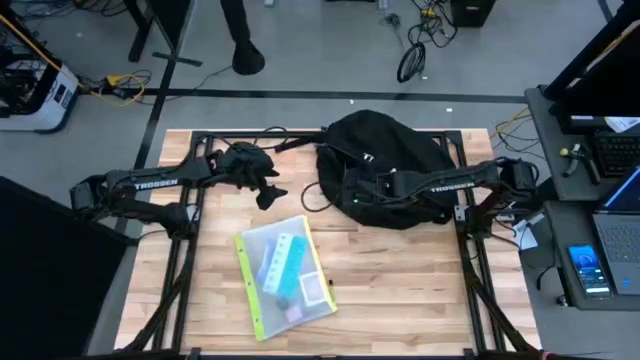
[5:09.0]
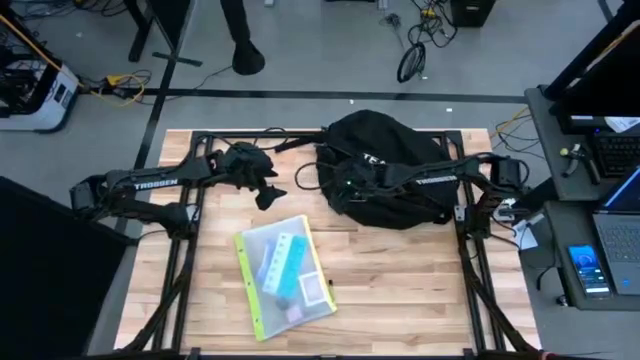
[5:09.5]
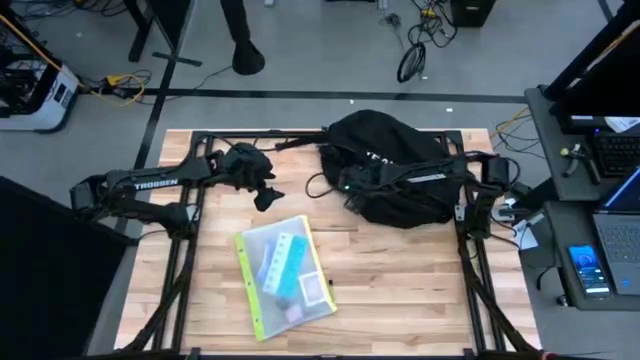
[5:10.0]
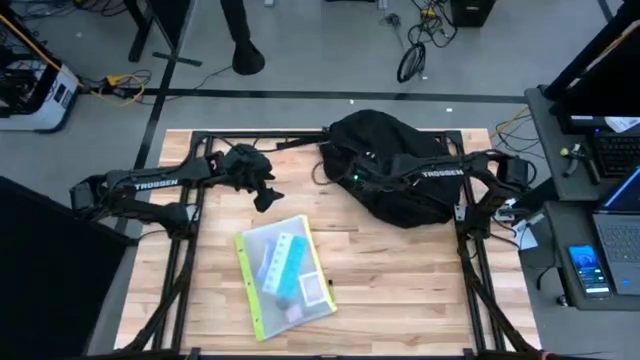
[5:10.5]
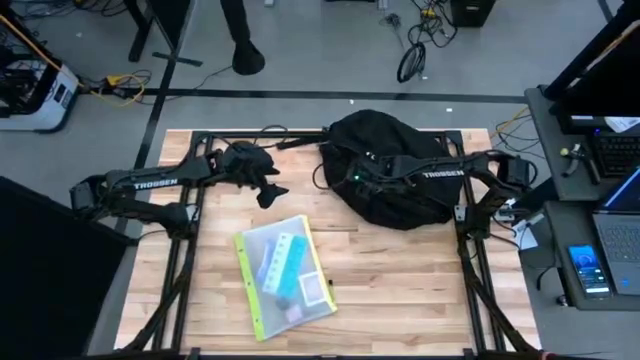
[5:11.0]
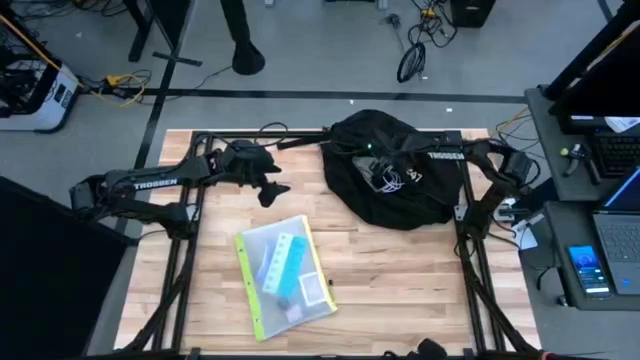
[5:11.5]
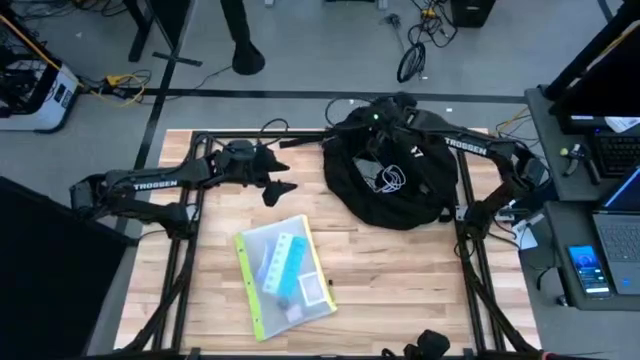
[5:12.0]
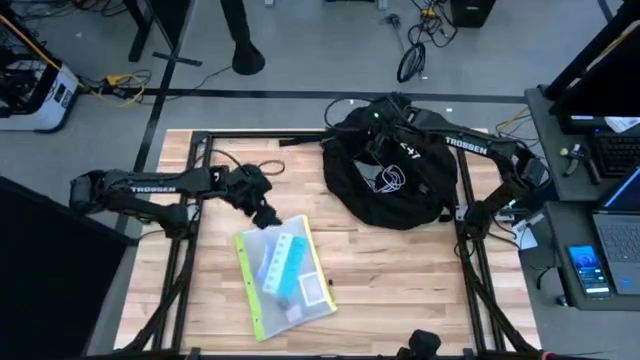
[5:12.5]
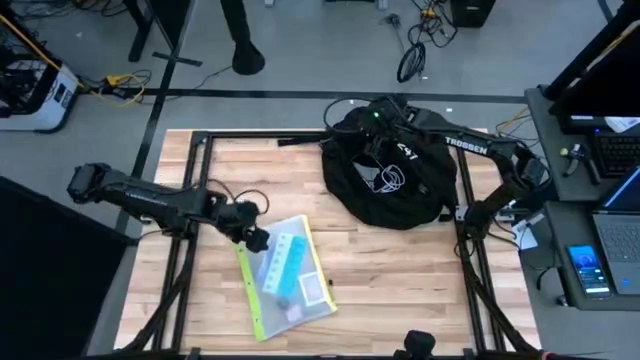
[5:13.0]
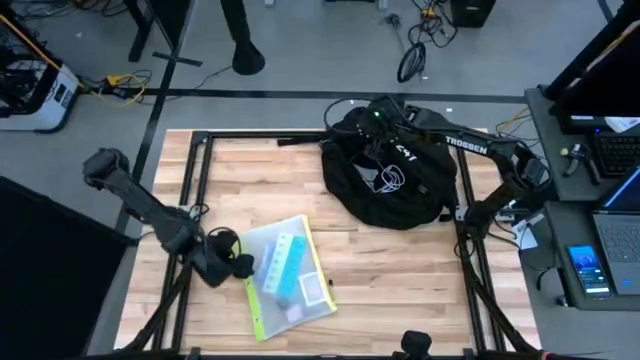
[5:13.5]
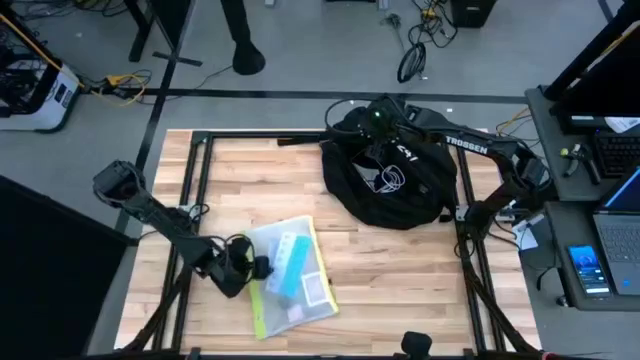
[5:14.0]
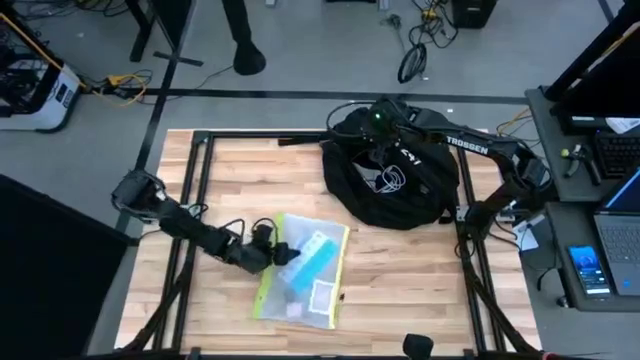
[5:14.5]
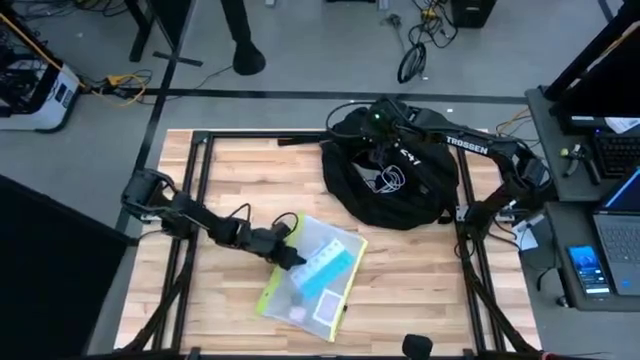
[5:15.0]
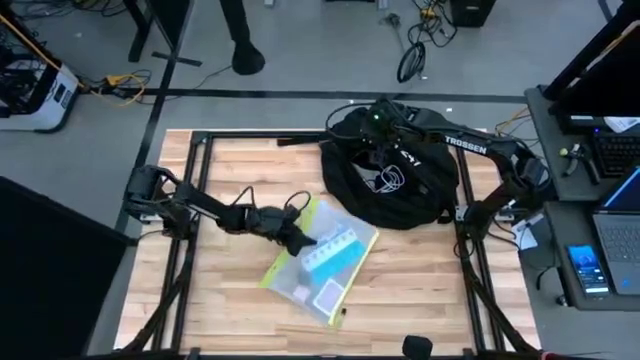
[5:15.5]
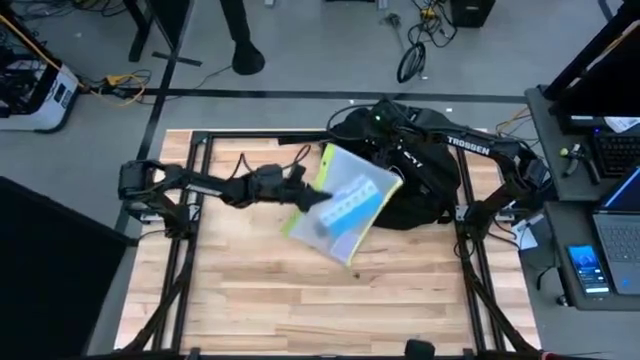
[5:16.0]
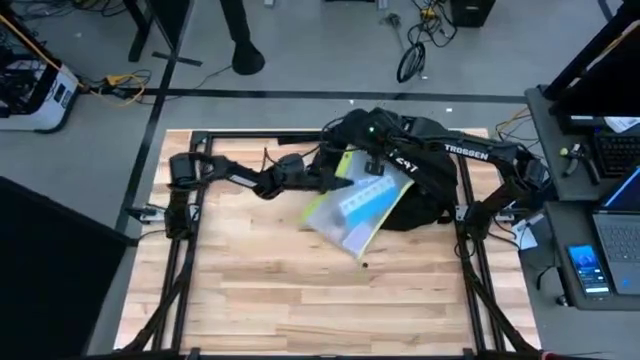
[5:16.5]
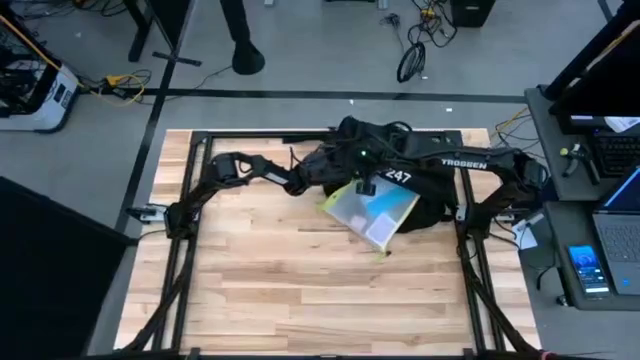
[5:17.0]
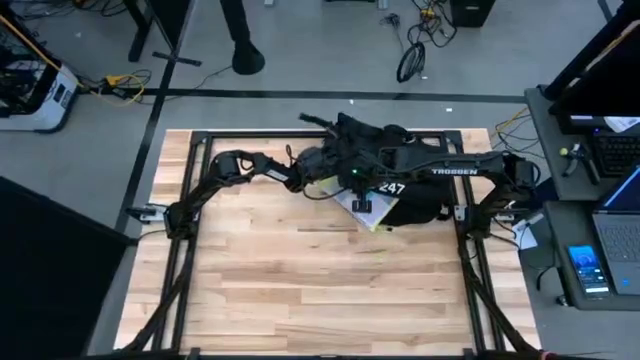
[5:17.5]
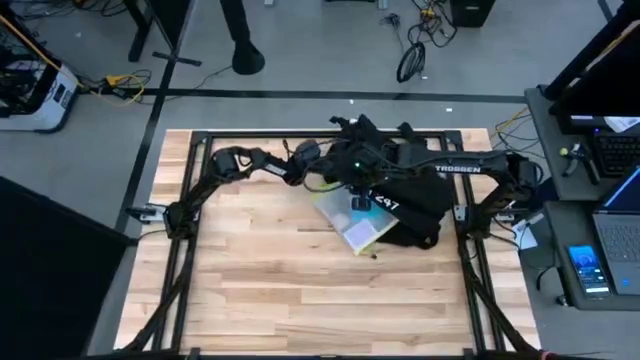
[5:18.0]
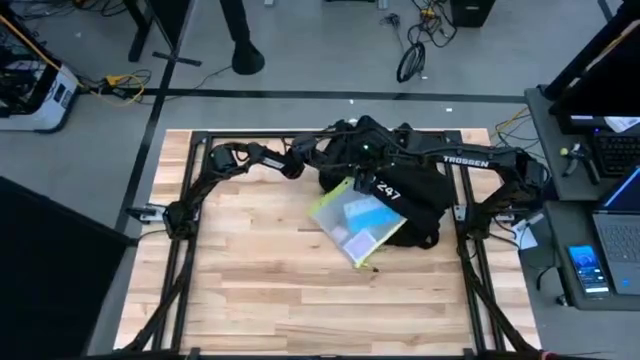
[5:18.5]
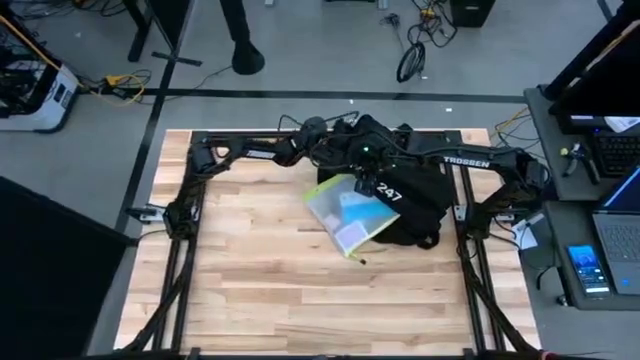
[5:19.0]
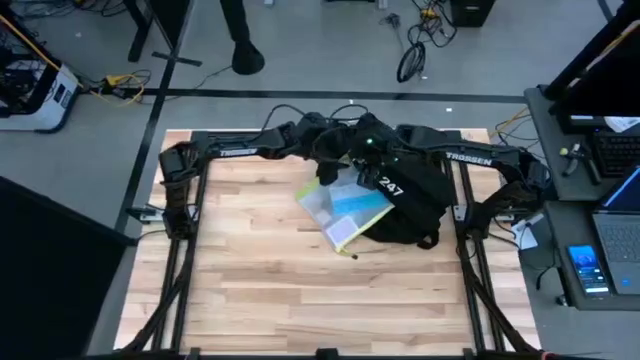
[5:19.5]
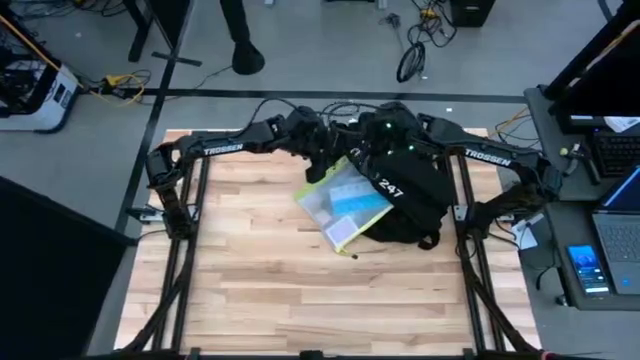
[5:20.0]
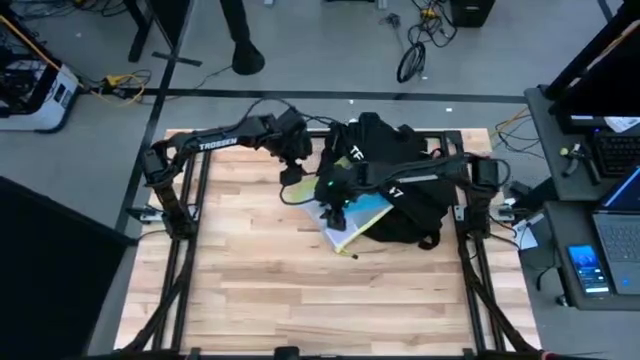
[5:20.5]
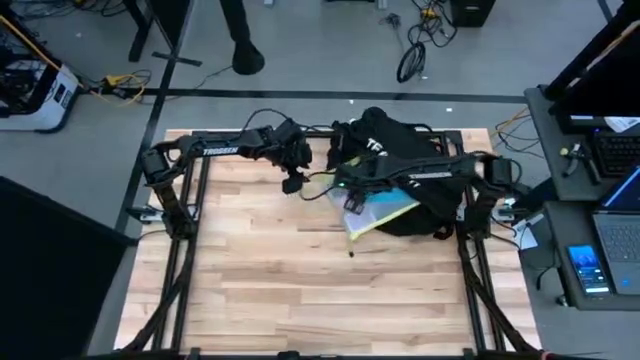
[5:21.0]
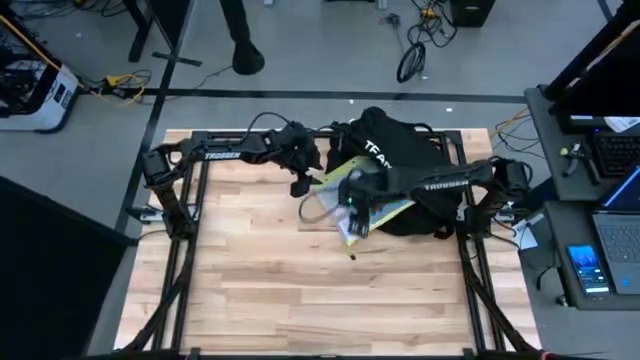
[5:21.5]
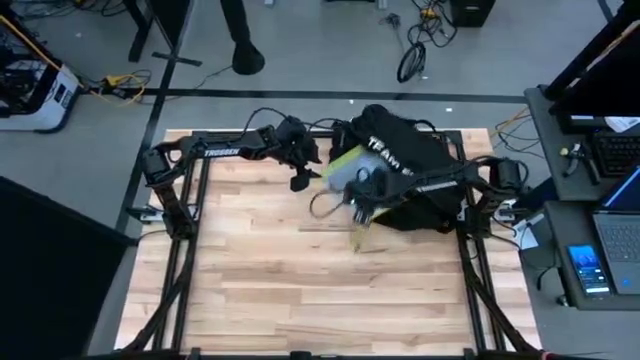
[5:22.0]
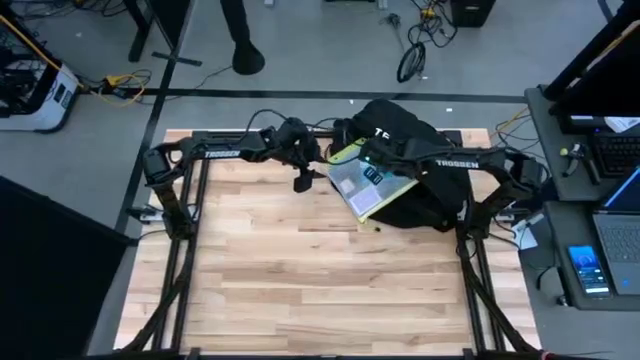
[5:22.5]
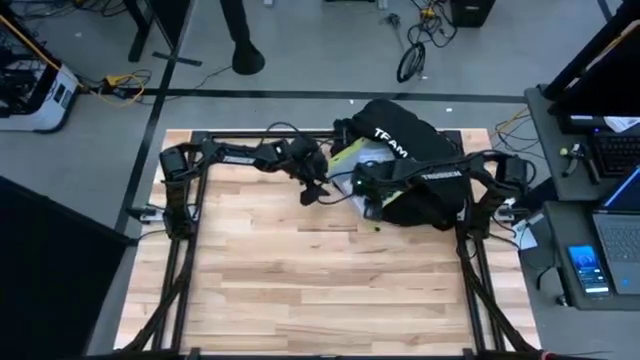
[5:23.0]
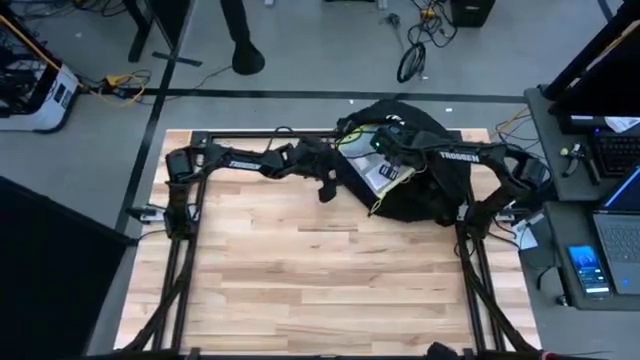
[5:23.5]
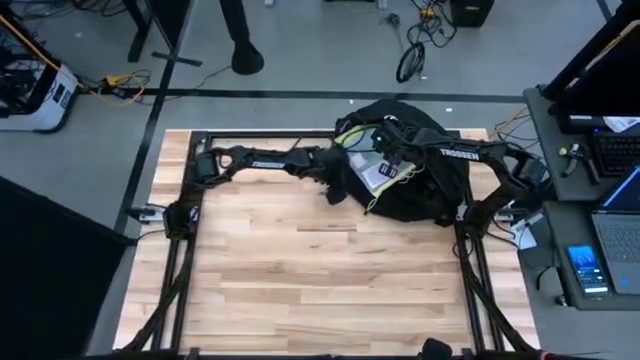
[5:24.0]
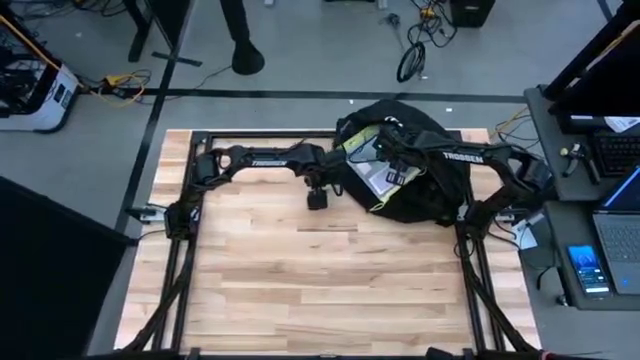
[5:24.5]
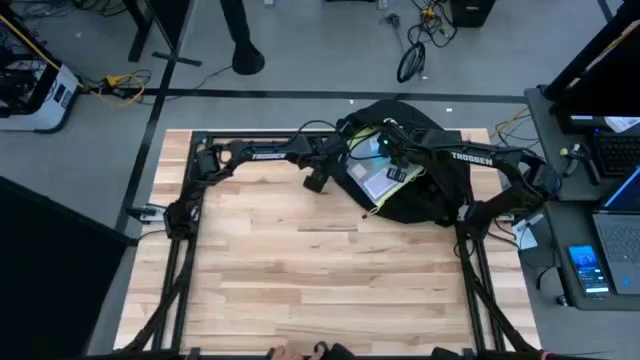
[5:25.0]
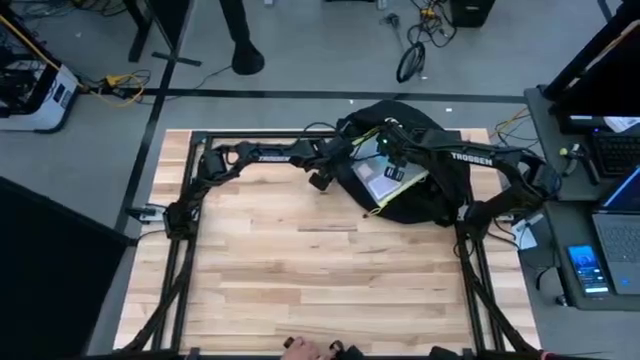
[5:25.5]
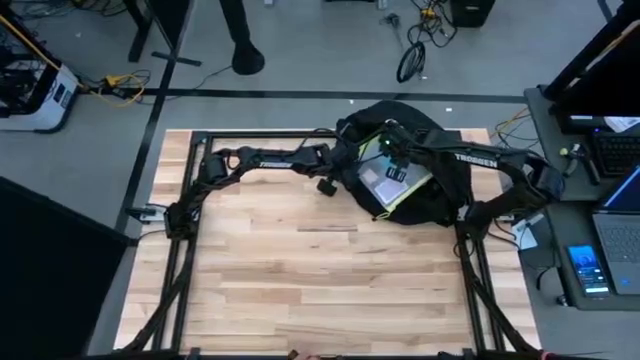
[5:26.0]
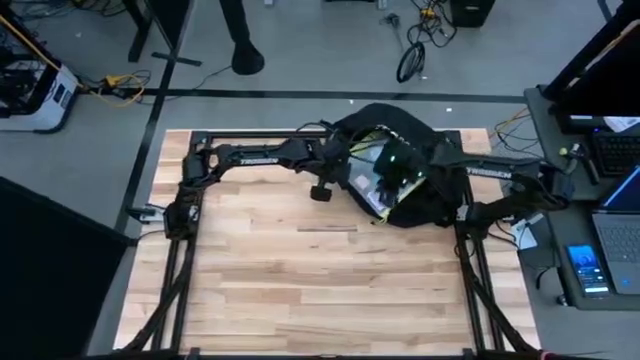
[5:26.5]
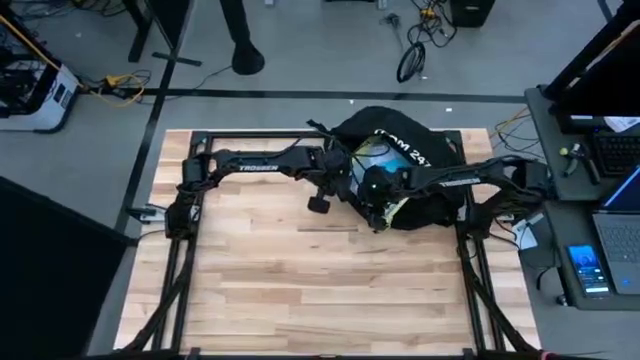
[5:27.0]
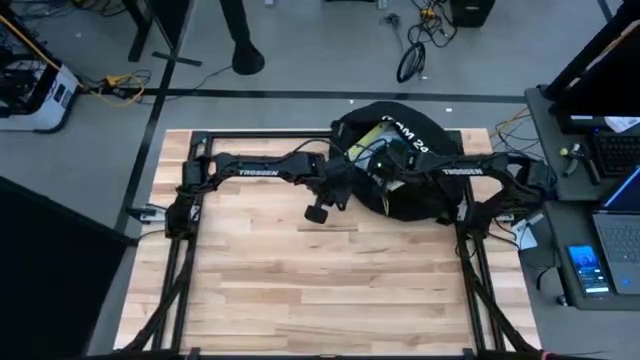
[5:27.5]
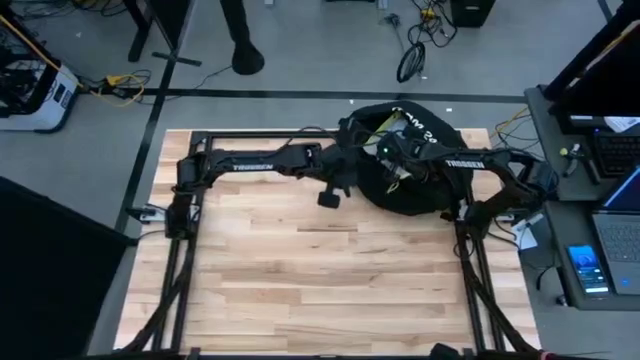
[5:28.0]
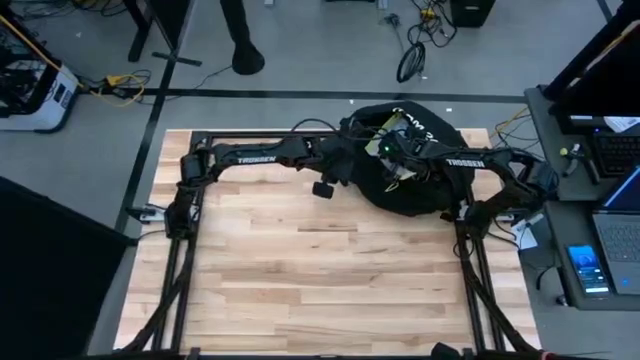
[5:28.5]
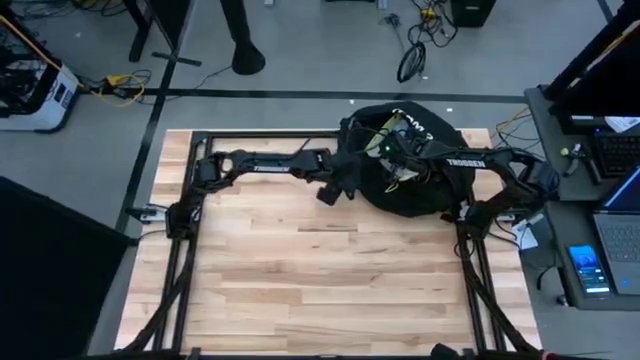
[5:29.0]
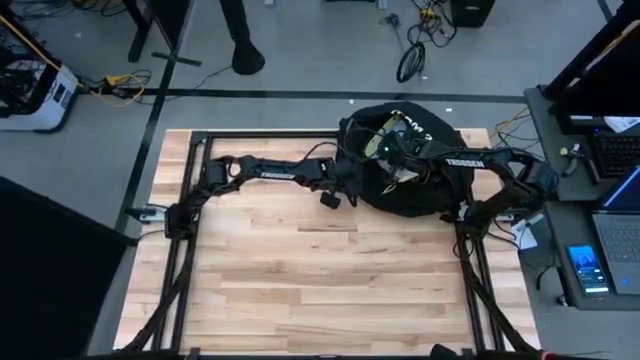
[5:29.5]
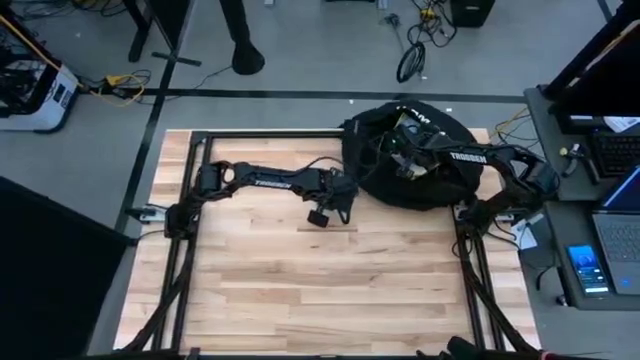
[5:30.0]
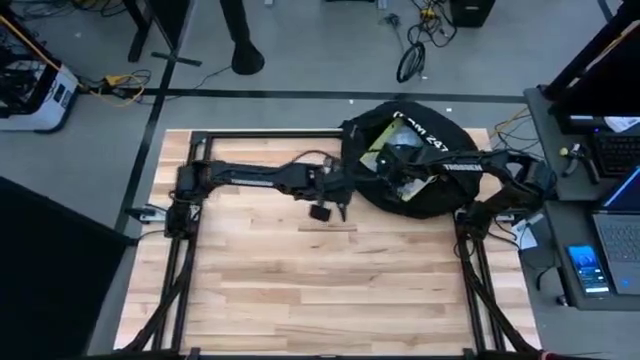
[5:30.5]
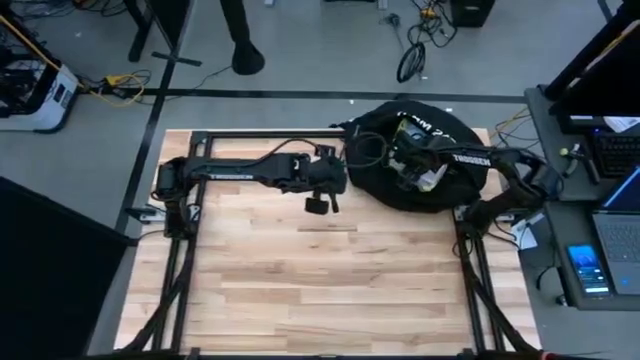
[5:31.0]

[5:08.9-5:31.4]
Task: Unpack backpack
Put the zip bag into the black backpack
